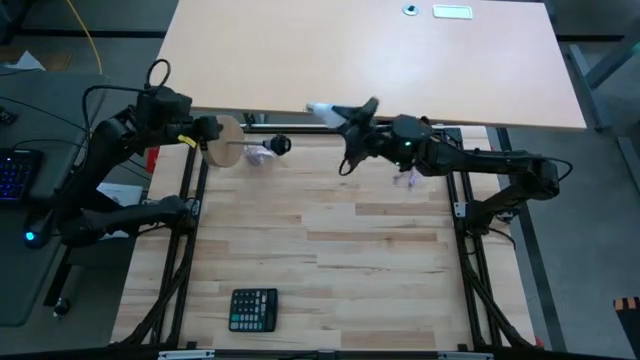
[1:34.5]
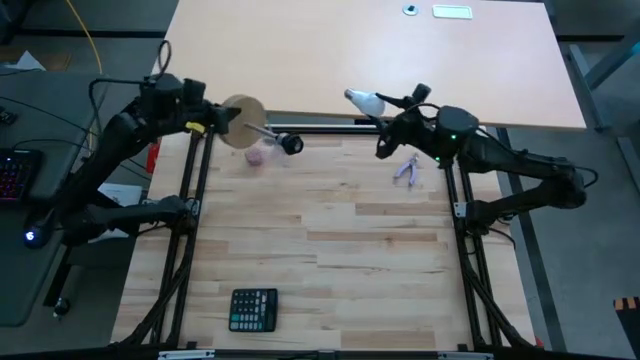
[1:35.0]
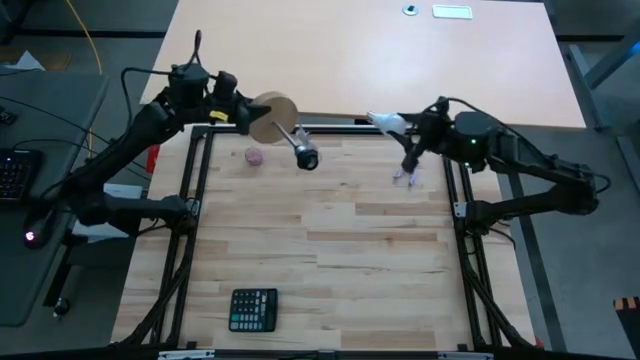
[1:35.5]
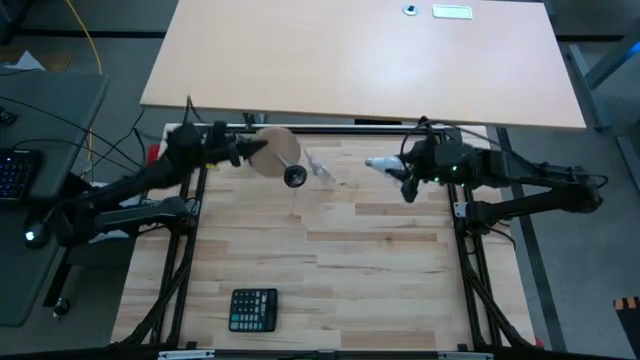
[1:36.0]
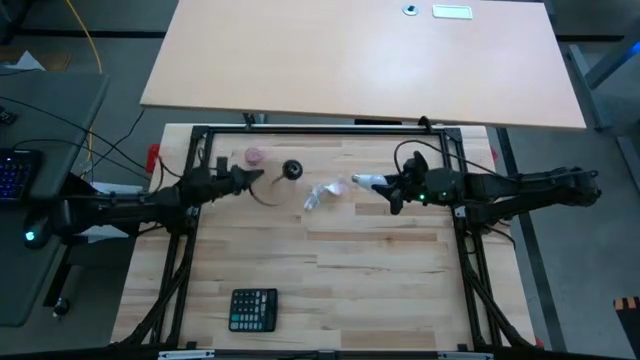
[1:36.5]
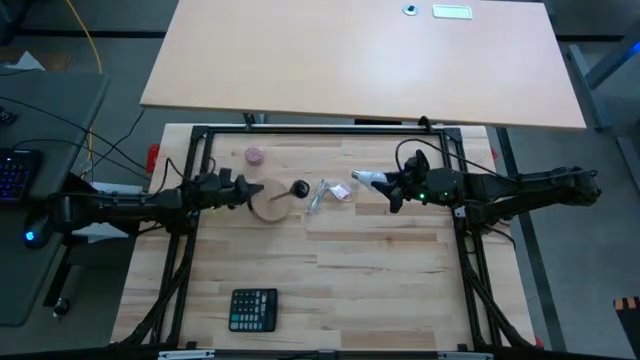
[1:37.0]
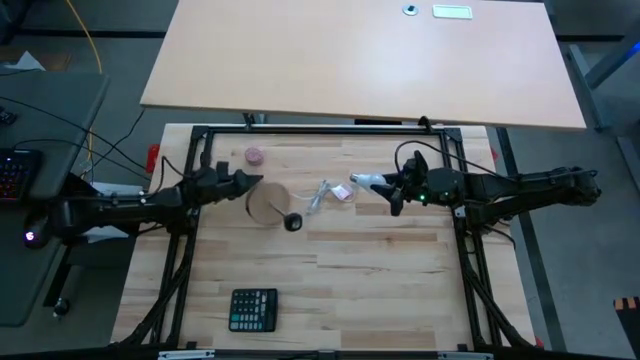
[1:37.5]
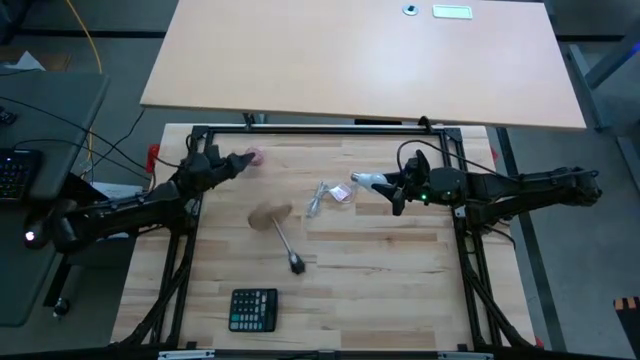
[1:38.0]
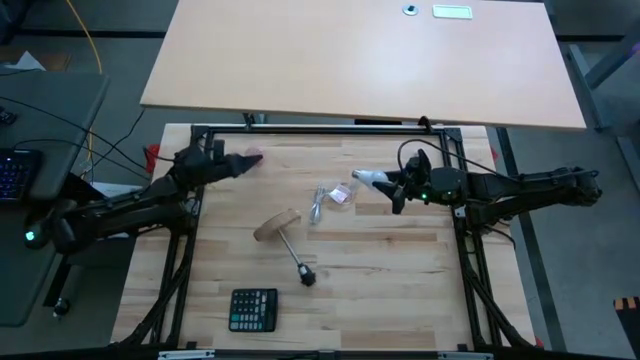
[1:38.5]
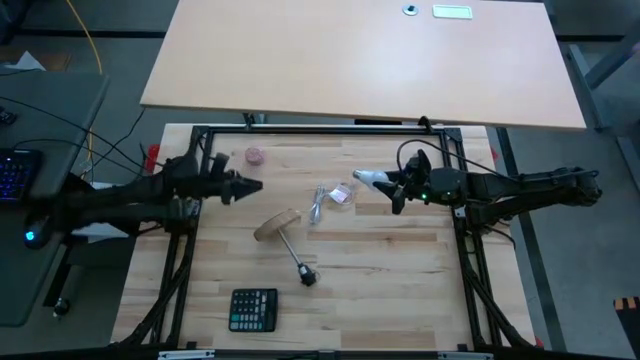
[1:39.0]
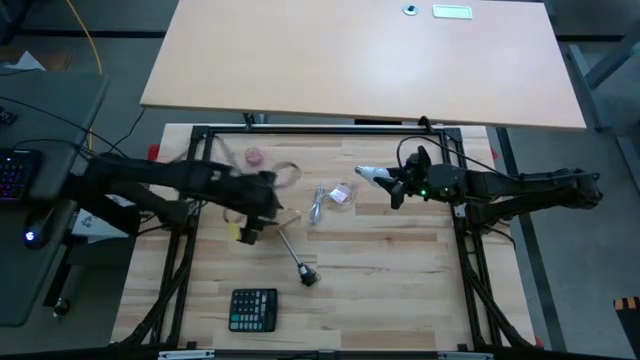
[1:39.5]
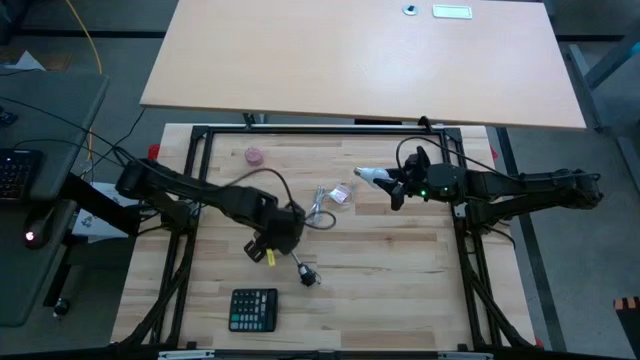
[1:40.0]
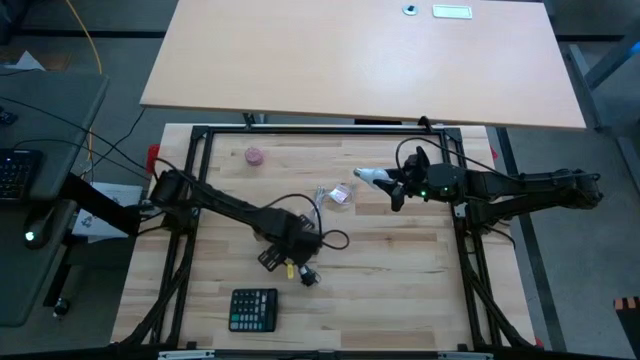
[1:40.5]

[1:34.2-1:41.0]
Task: Screw lightbulb
Put the brown lamp on the table

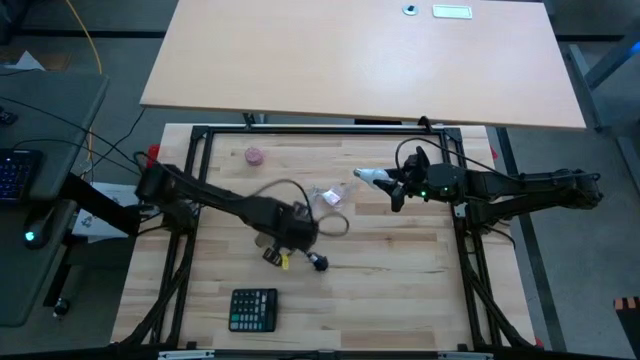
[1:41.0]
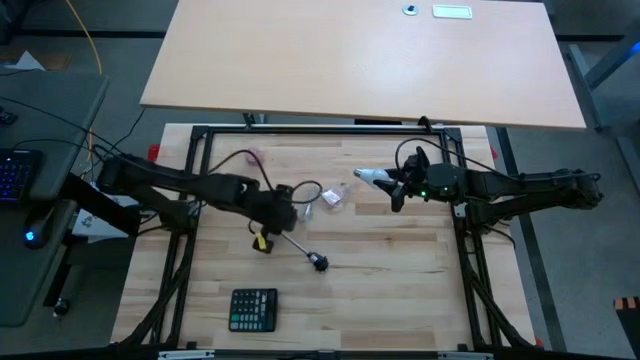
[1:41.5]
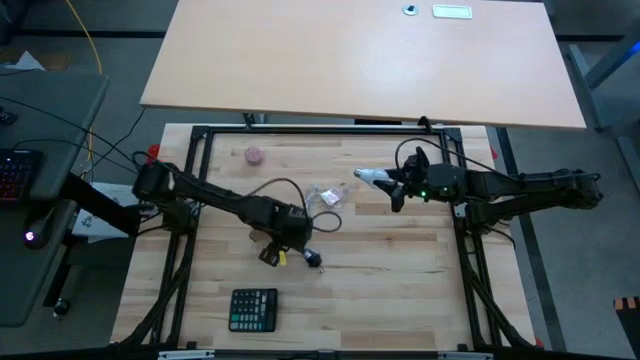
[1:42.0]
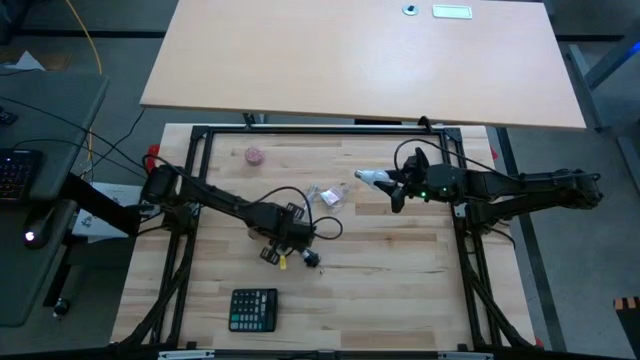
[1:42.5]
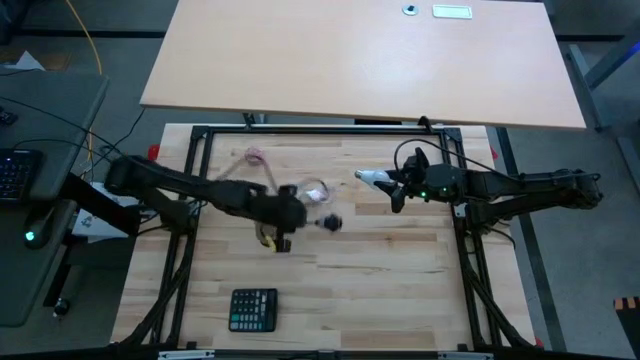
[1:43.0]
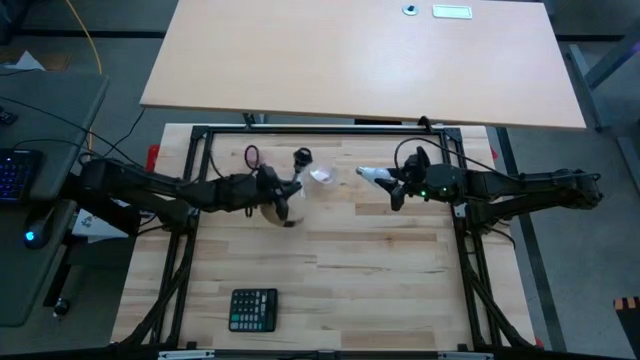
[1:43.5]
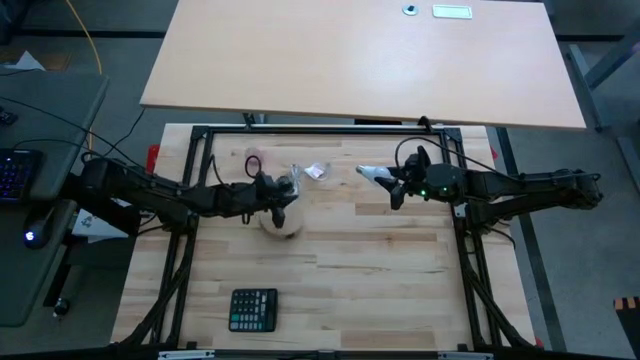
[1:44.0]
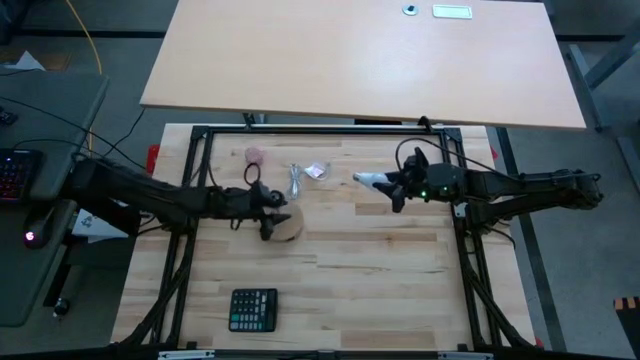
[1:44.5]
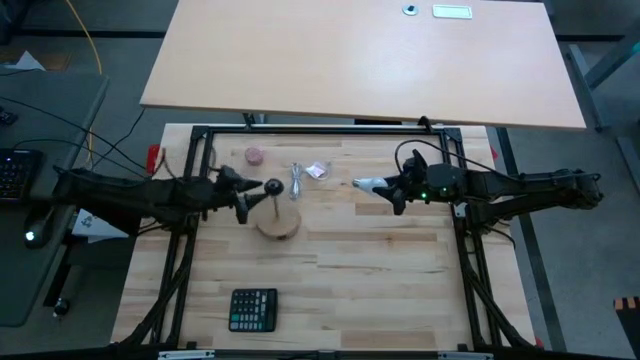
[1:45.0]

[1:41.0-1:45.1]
Put the brown lamp on the table

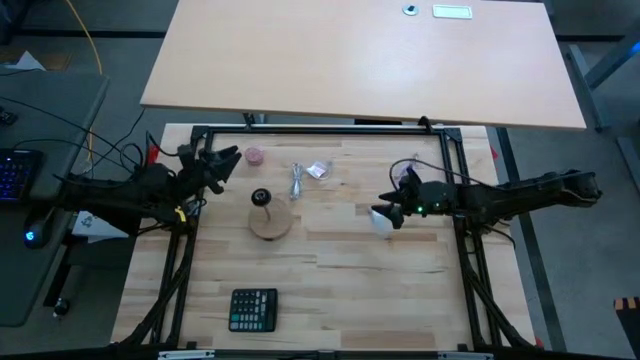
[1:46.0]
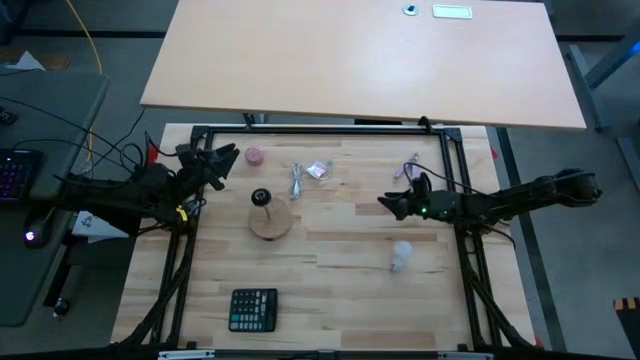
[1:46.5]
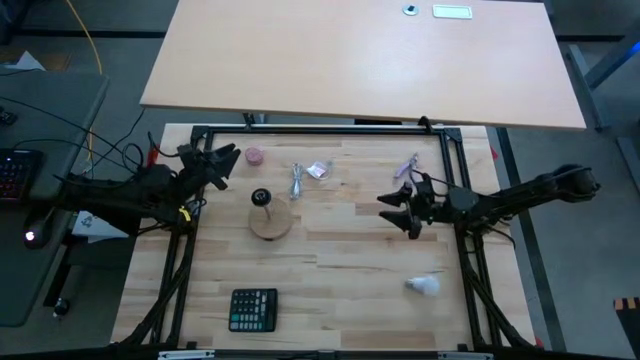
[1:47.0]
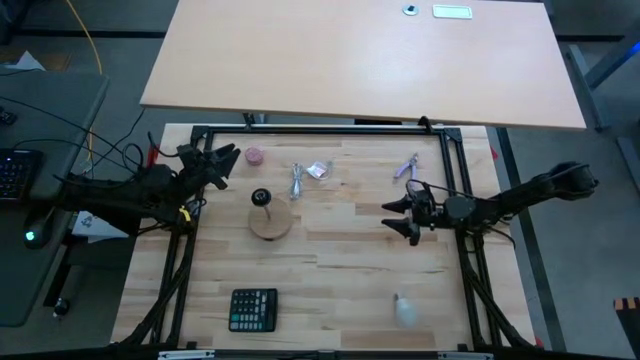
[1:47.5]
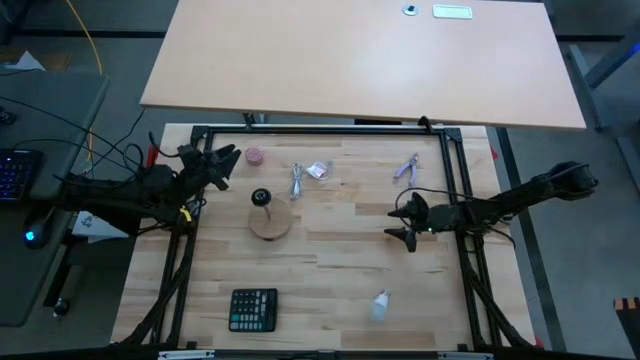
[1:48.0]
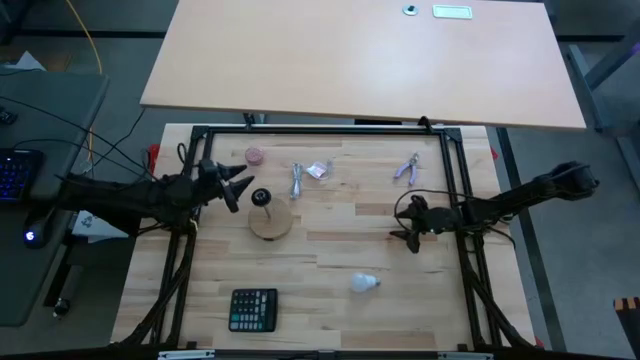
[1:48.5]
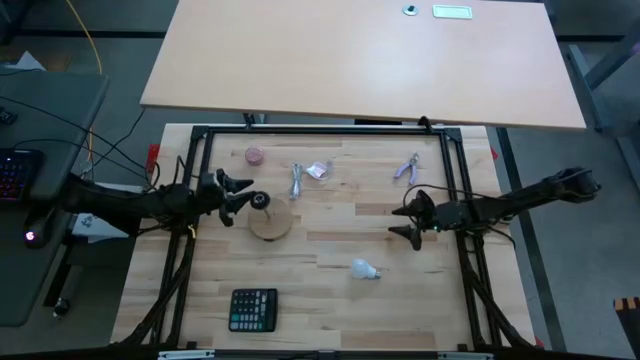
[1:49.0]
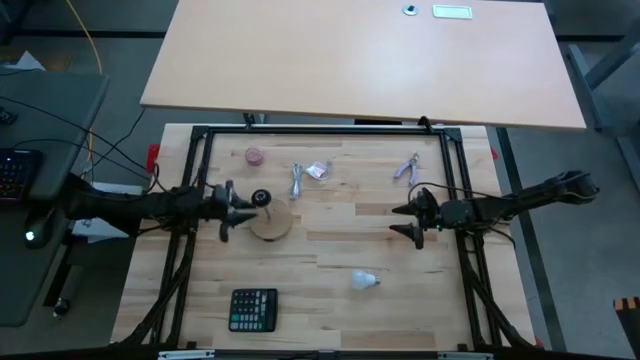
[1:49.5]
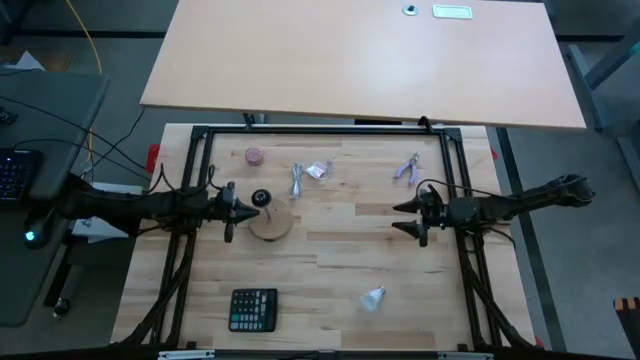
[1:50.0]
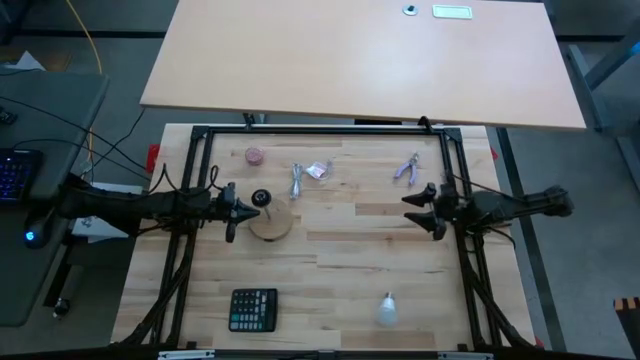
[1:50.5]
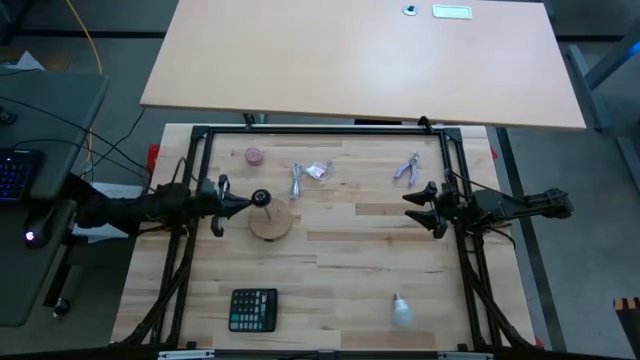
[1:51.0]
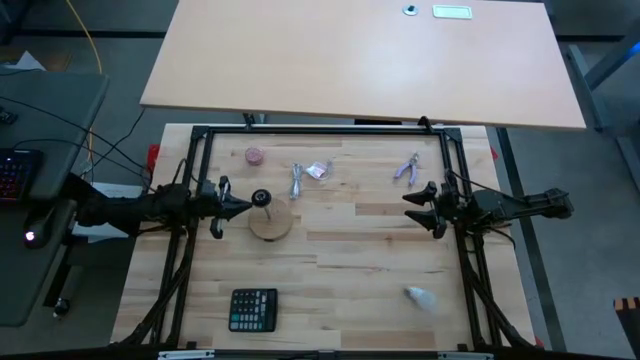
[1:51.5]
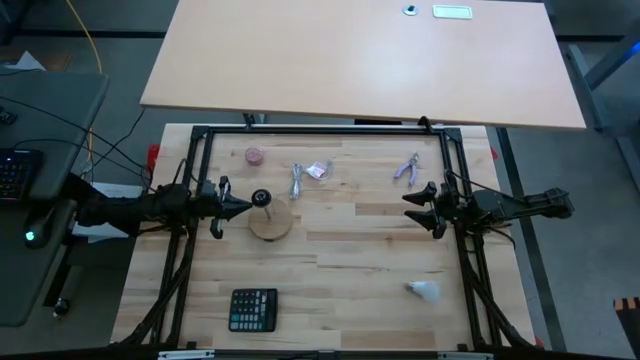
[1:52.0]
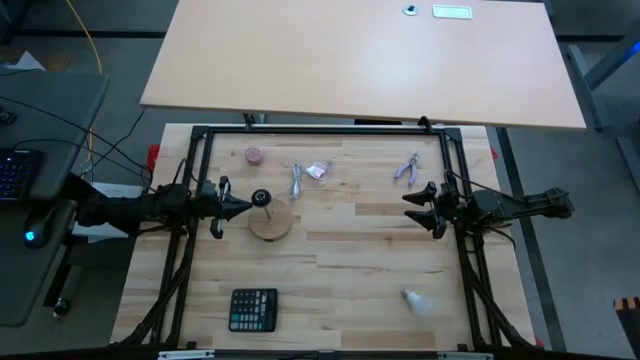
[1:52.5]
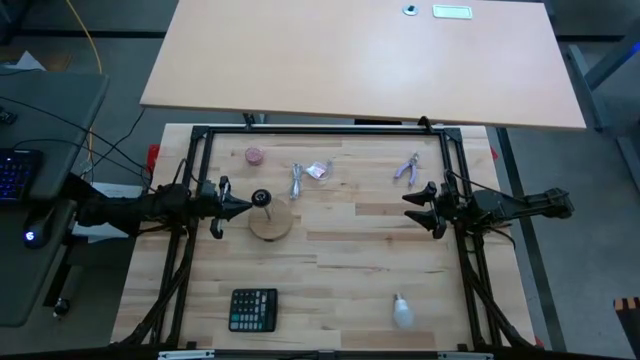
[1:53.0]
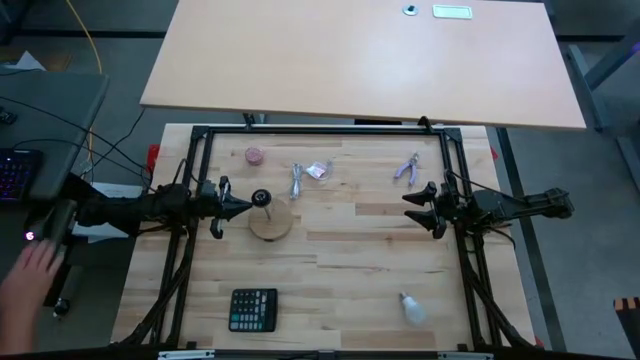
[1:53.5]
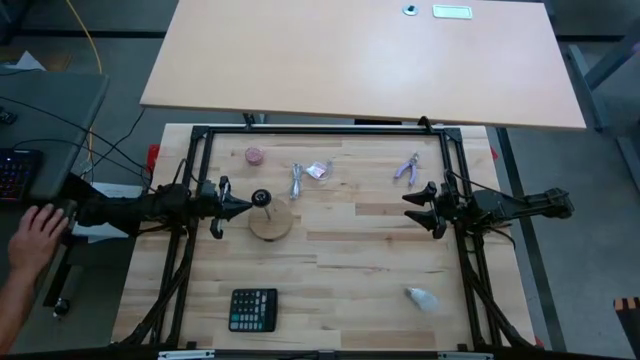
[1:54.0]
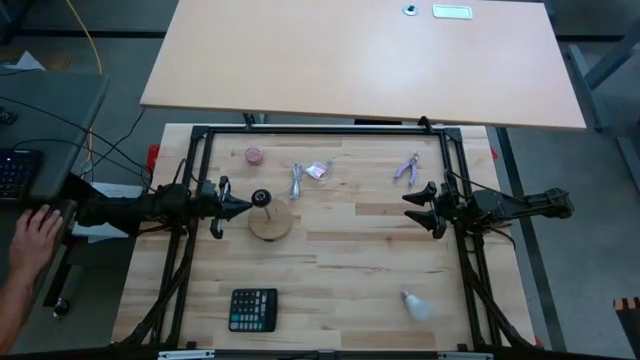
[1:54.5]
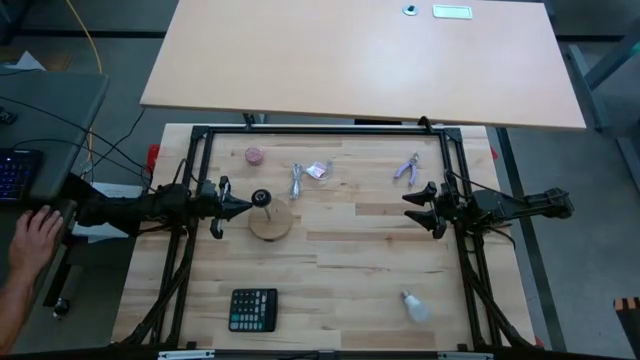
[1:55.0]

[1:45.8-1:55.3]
Return to Home Position
